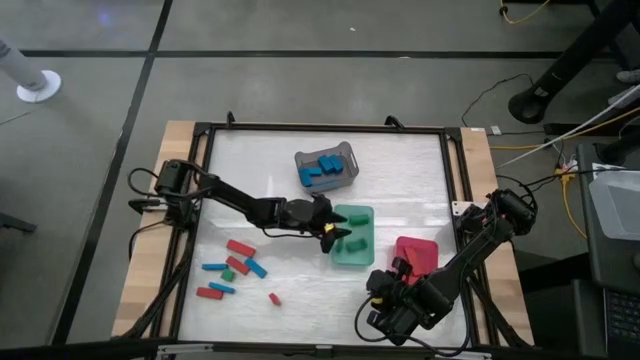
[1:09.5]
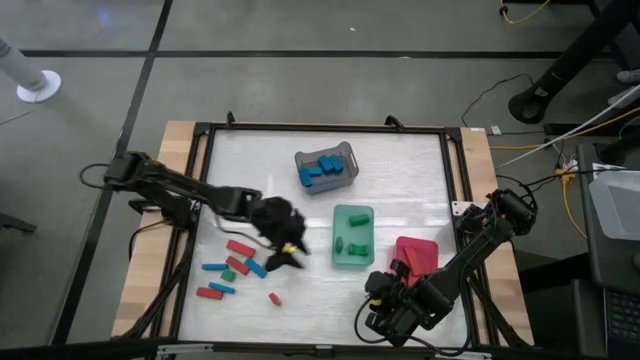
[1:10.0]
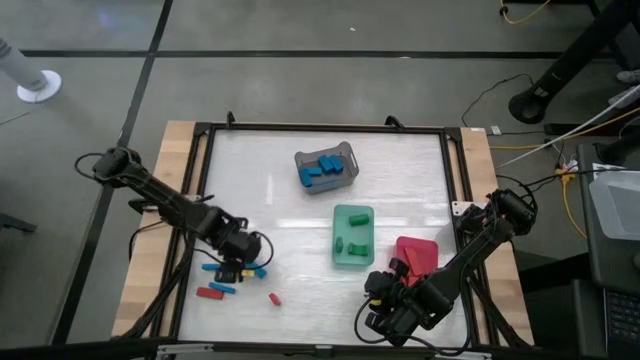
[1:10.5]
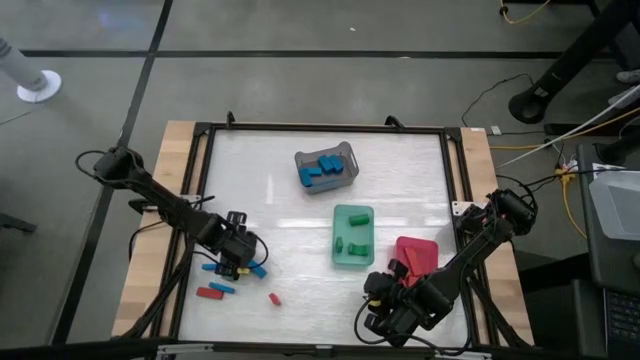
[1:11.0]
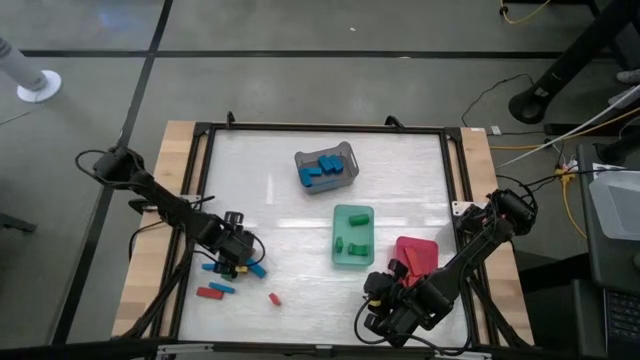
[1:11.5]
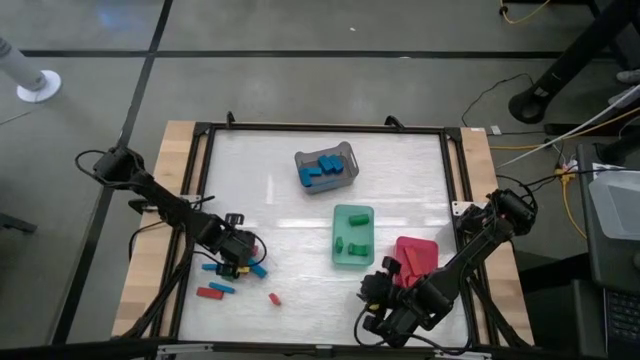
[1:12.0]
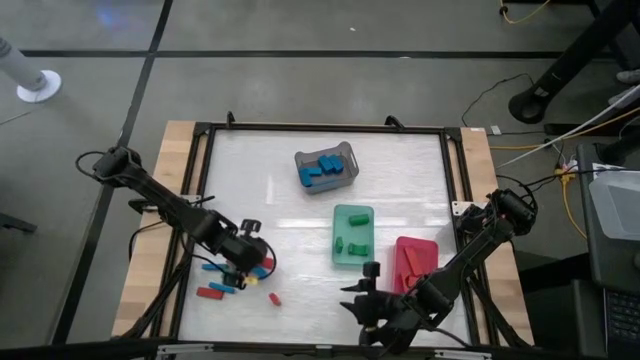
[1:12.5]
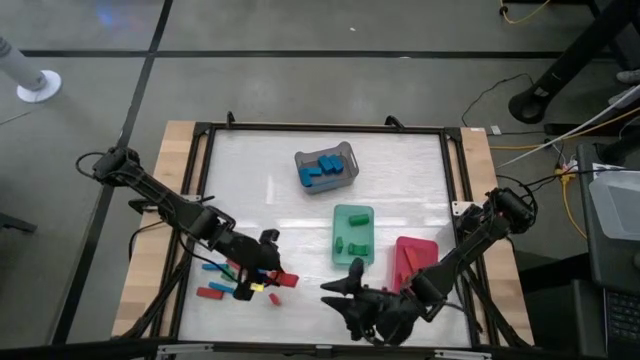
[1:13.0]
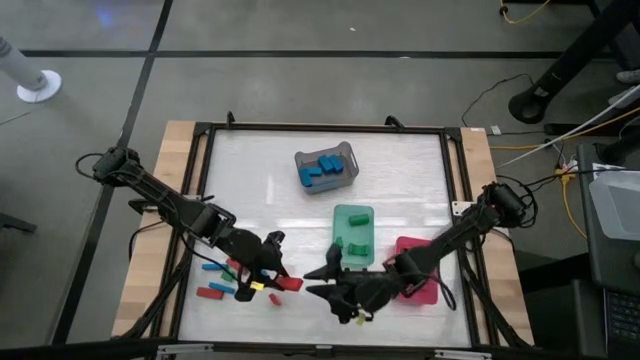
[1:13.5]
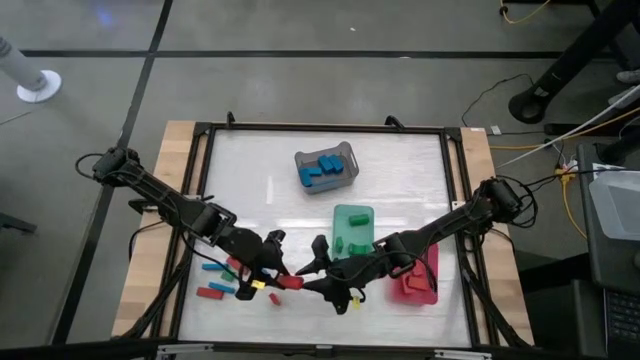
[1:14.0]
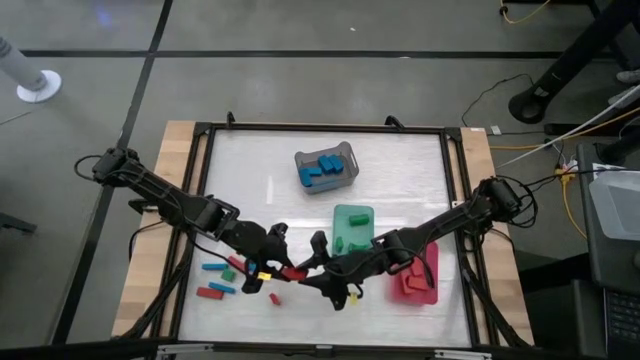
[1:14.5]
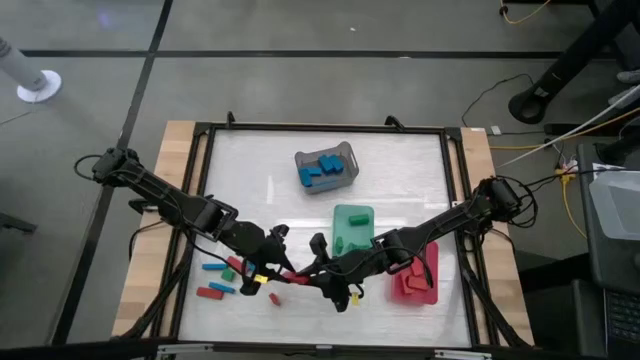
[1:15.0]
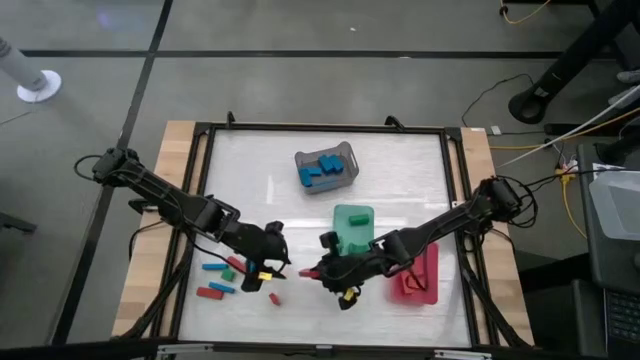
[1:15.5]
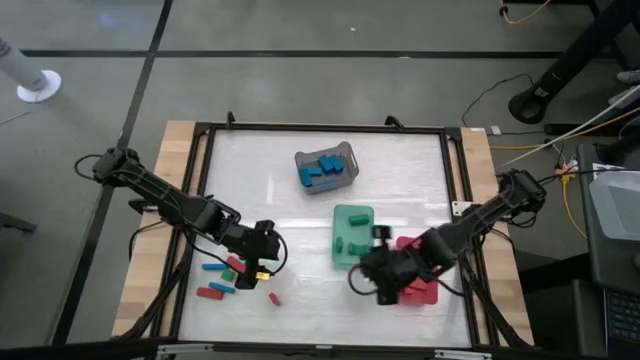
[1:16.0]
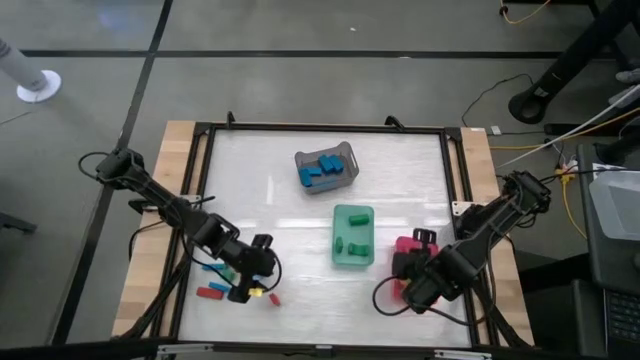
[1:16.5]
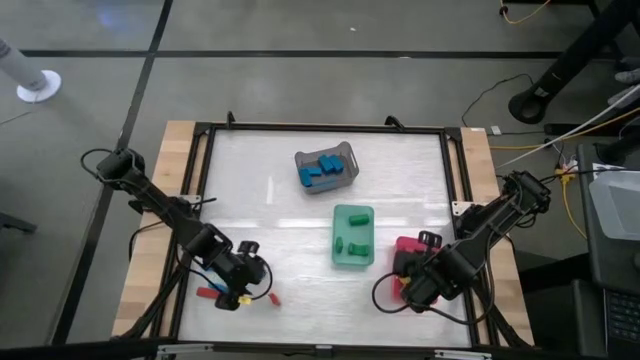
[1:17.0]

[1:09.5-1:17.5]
Task: Sort blocks
Put the red block into the pink bin

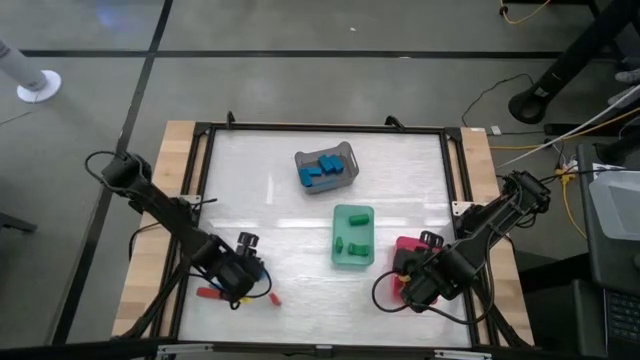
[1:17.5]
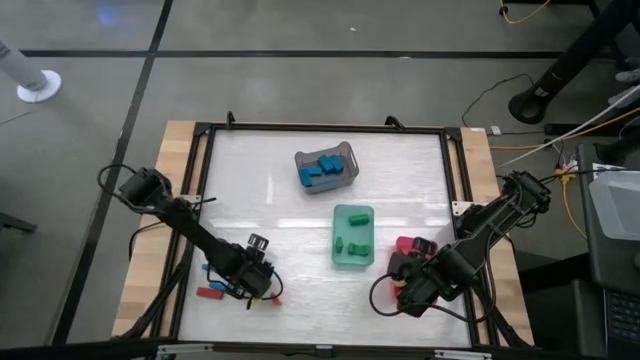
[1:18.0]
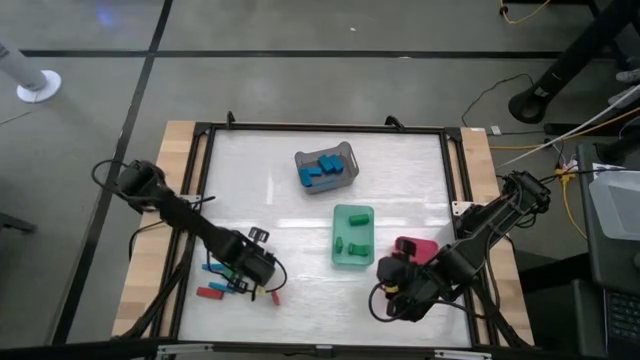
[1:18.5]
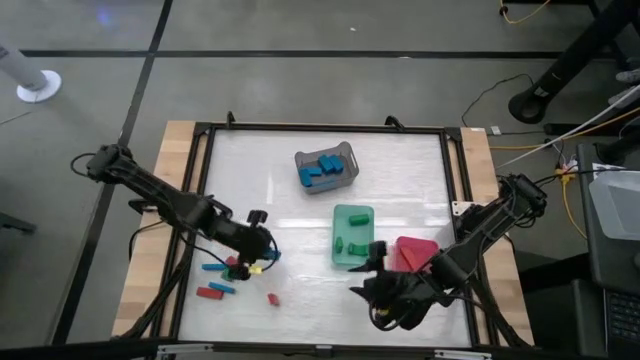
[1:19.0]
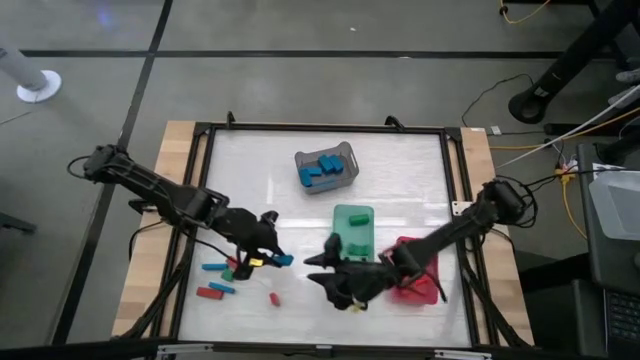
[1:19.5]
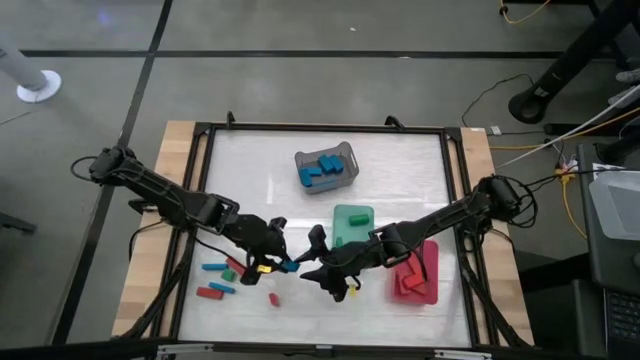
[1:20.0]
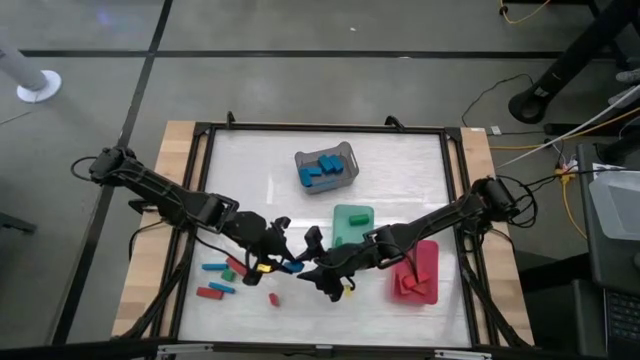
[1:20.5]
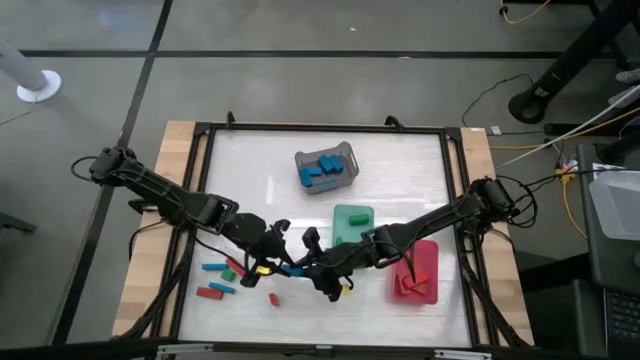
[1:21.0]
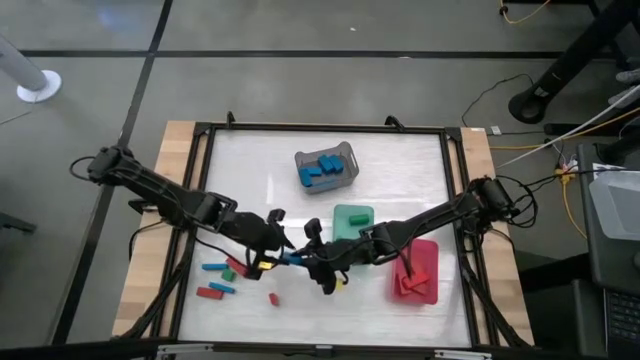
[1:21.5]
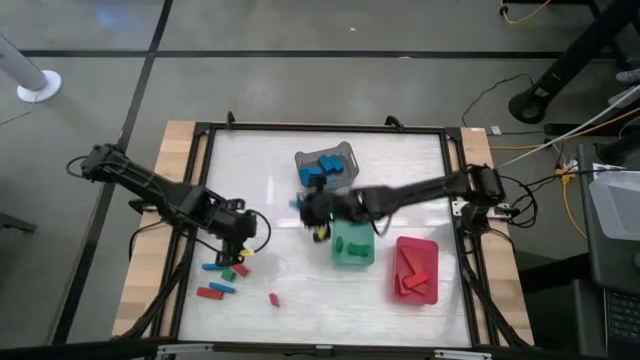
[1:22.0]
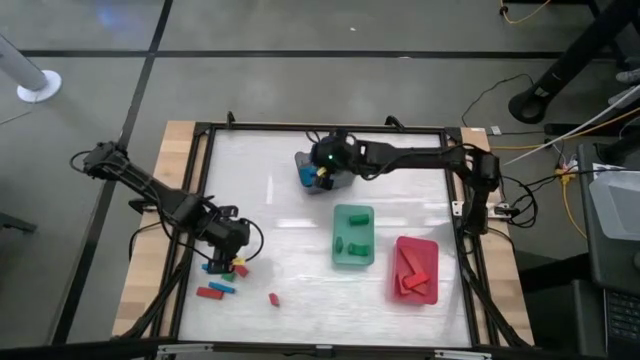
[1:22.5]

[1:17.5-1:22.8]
Put the blue block into the gray bin

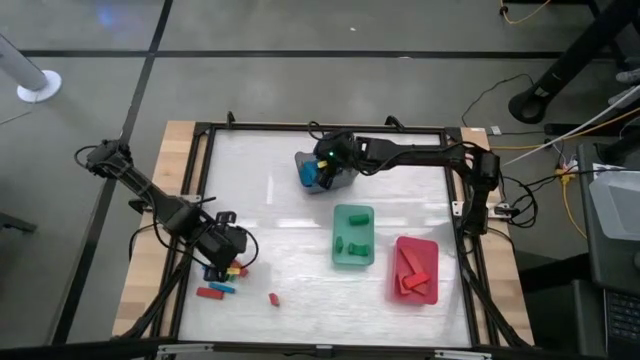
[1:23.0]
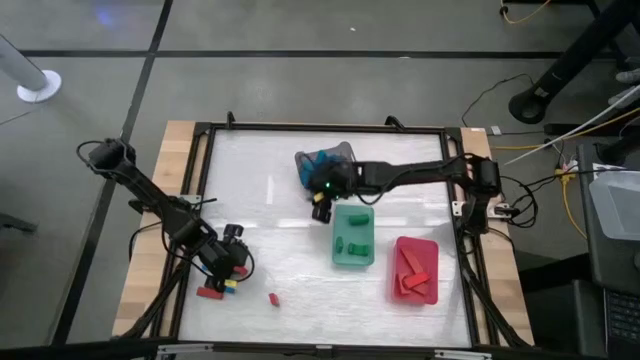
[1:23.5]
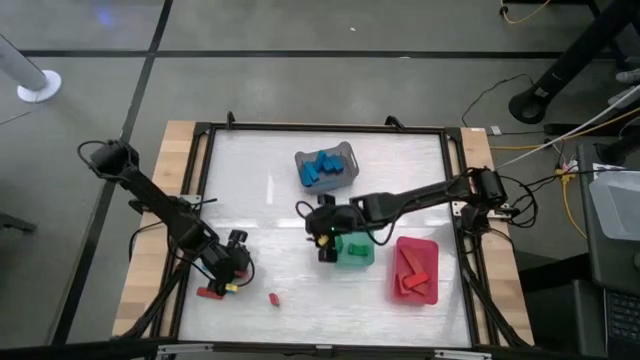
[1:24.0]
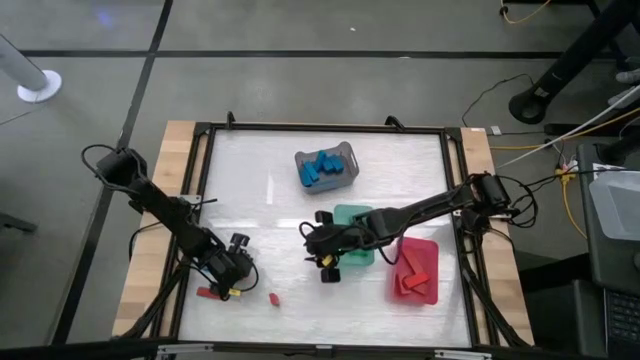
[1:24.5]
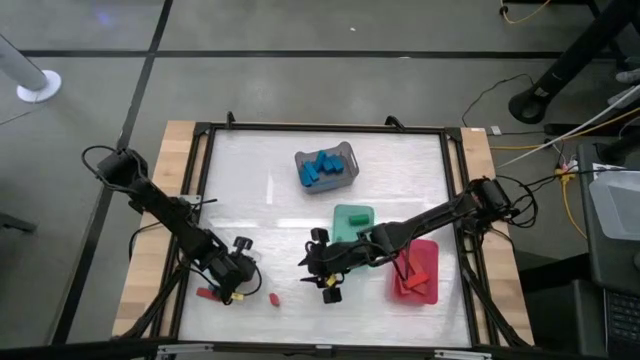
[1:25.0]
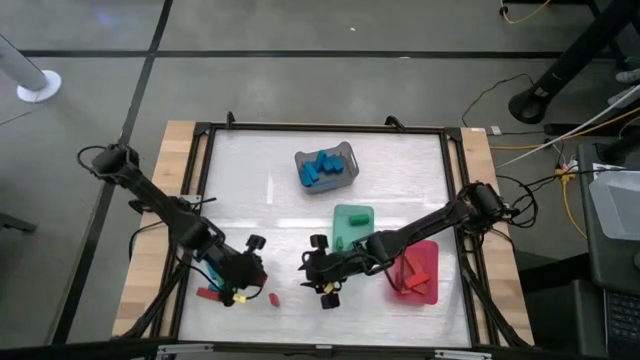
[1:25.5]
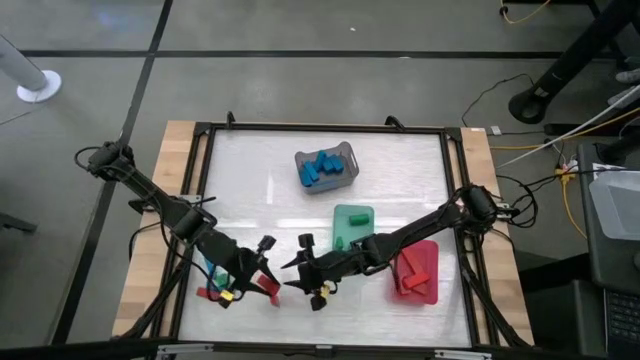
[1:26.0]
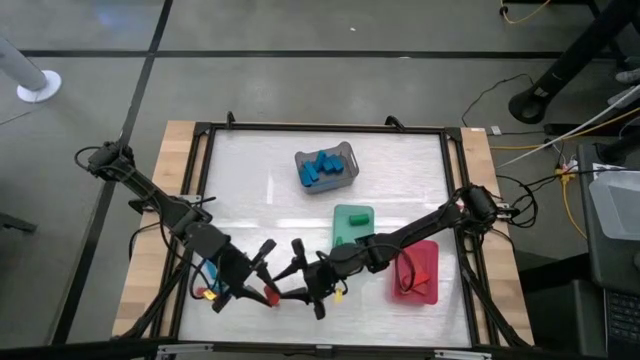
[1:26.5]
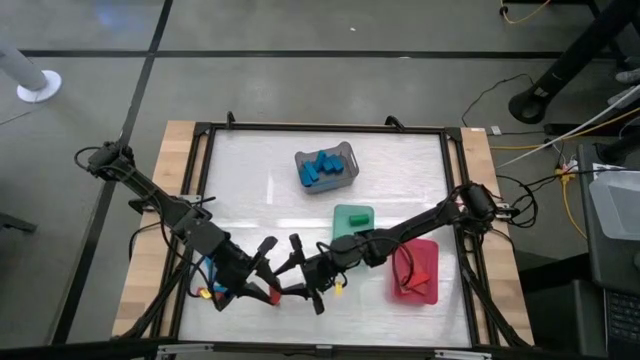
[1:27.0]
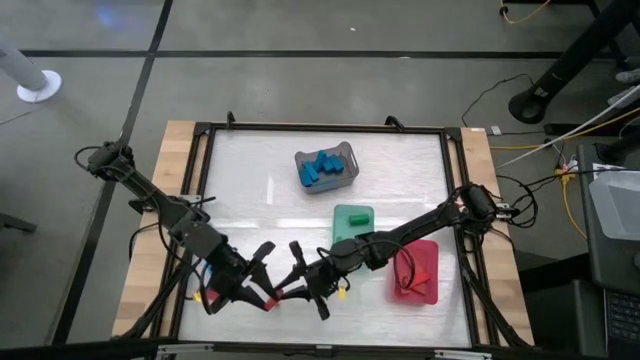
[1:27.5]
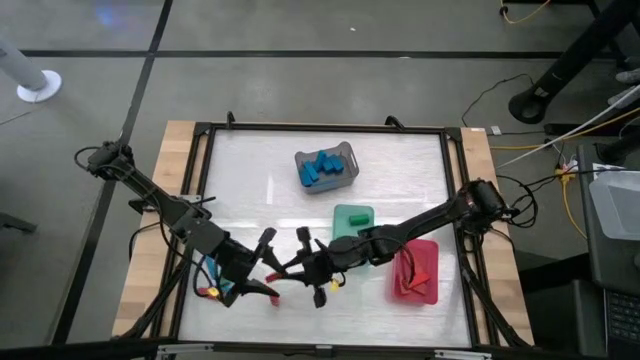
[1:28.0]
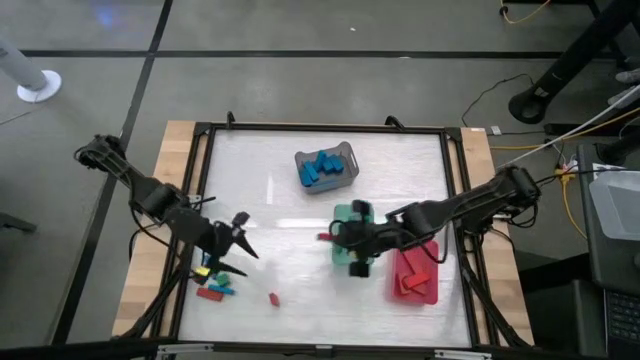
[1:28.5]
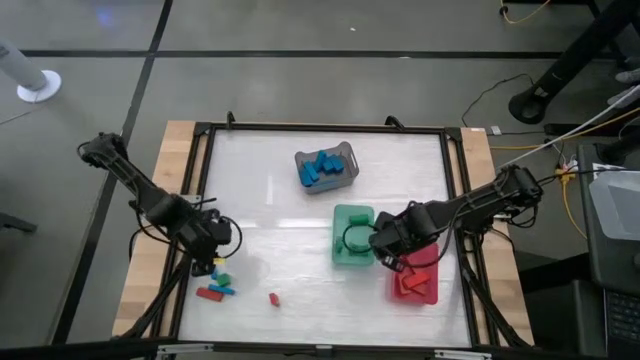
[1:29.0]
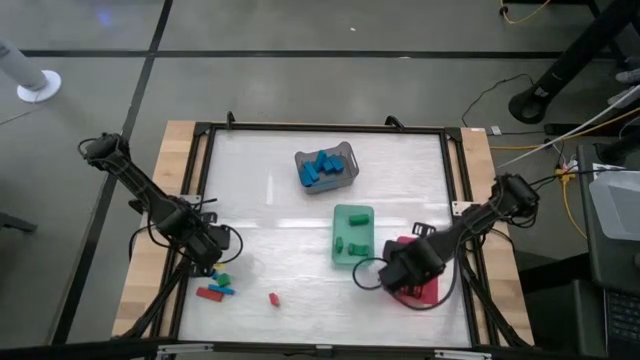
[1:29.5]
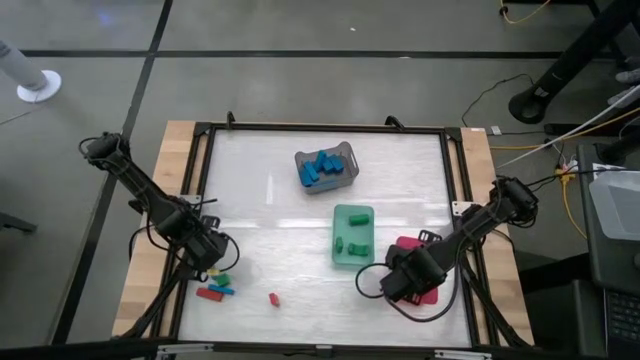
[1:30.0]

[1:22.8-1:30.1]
Put the red block into the pink bin

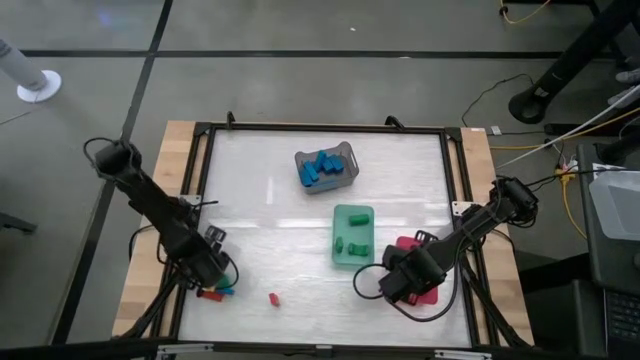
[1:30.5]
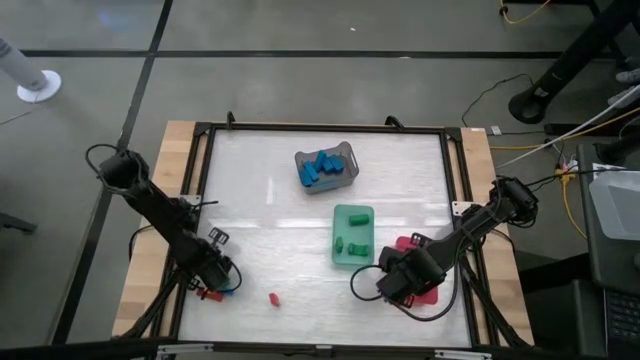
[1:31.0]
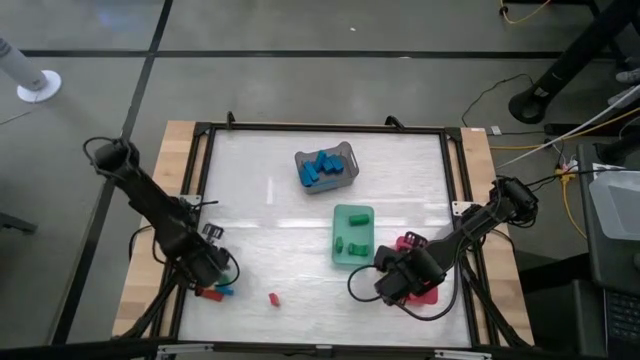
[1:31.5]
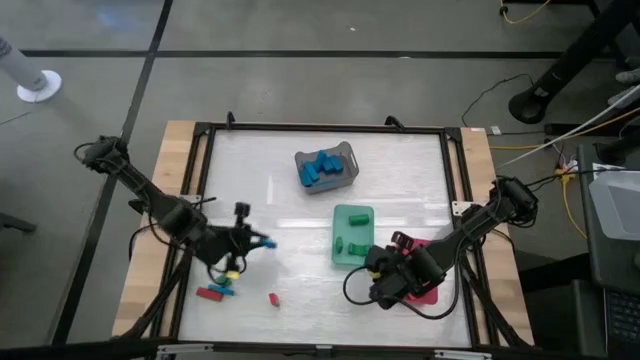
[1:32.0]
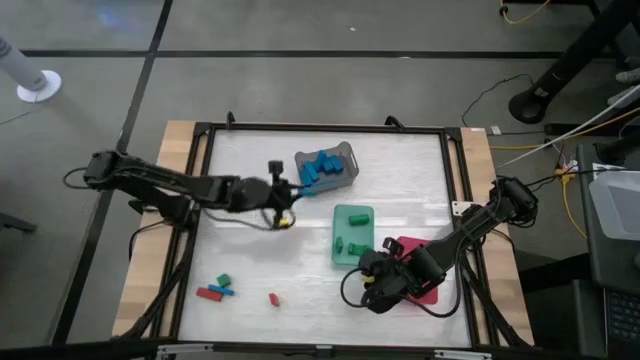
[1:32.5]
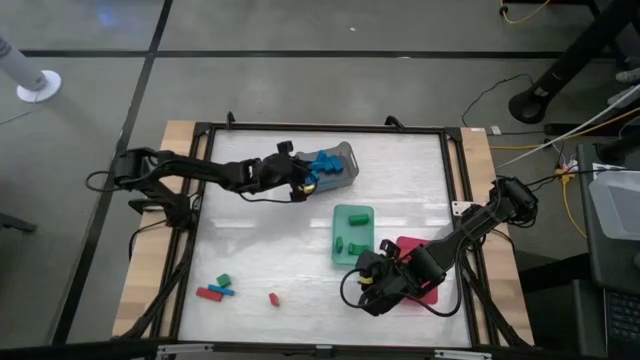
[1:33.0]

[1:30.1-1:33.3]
Put the blue block into the gray bin
